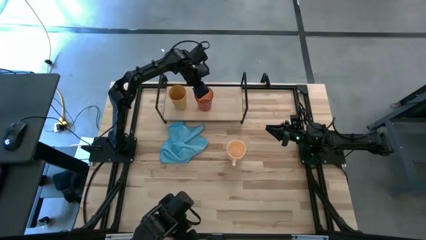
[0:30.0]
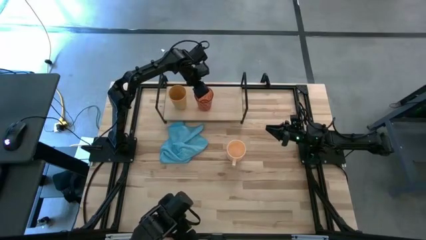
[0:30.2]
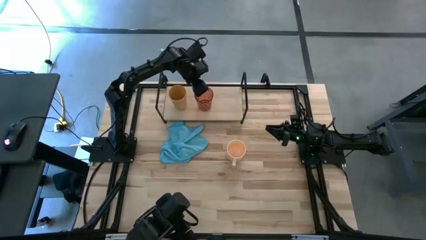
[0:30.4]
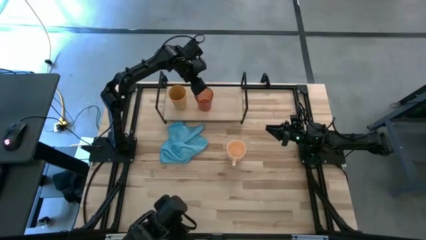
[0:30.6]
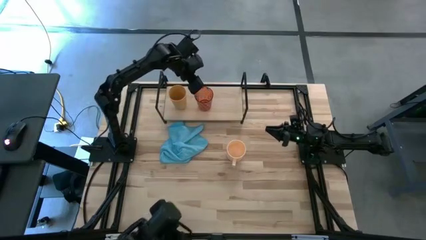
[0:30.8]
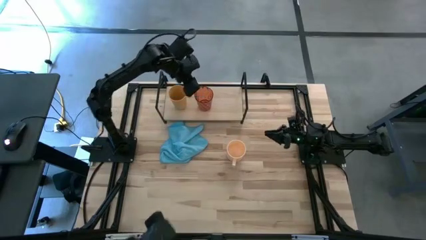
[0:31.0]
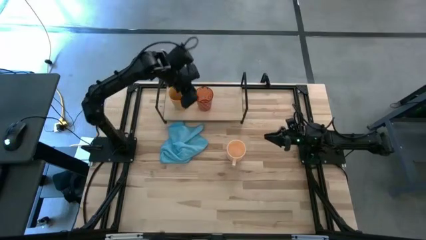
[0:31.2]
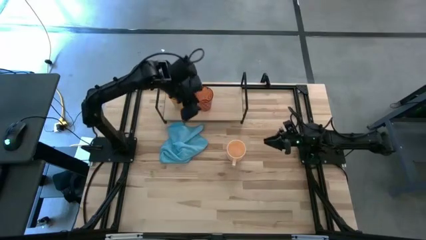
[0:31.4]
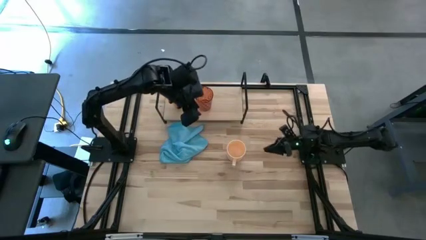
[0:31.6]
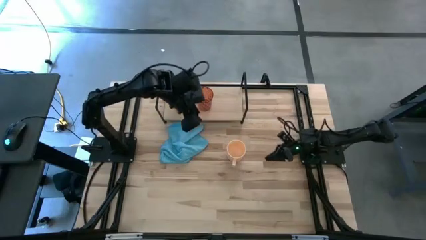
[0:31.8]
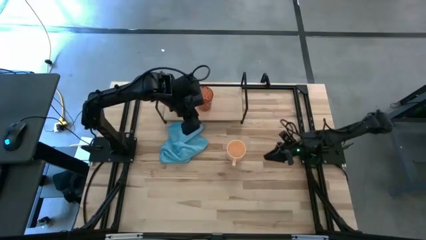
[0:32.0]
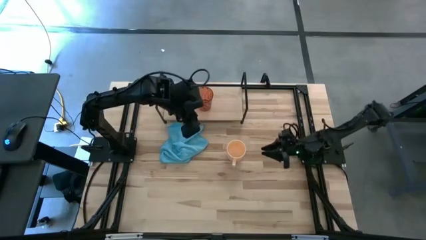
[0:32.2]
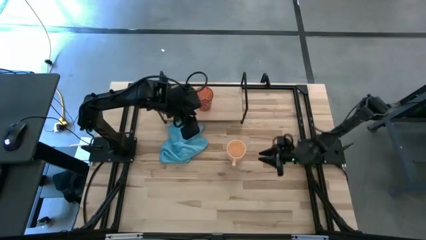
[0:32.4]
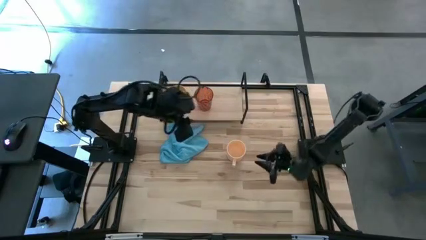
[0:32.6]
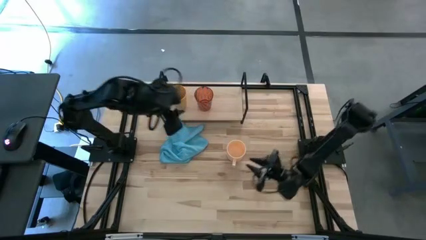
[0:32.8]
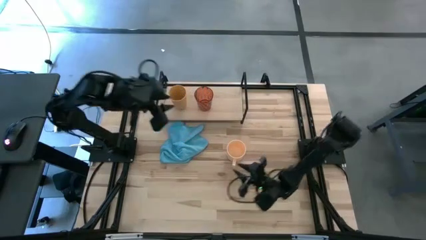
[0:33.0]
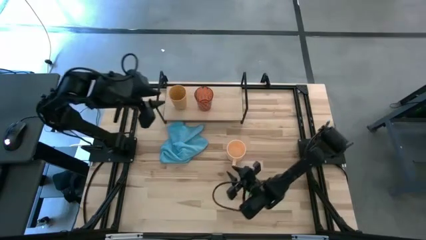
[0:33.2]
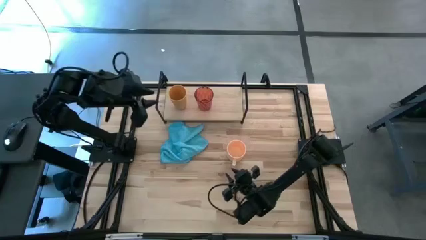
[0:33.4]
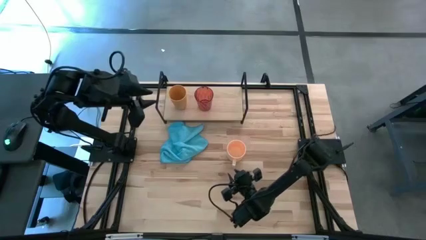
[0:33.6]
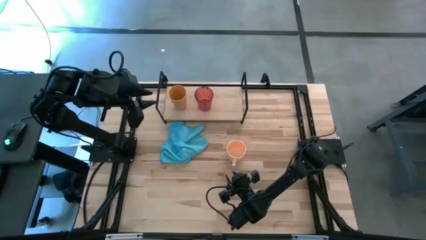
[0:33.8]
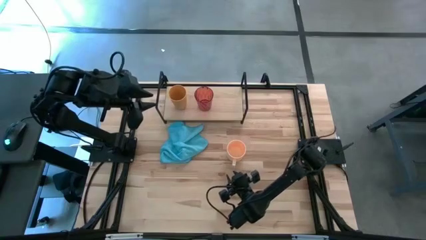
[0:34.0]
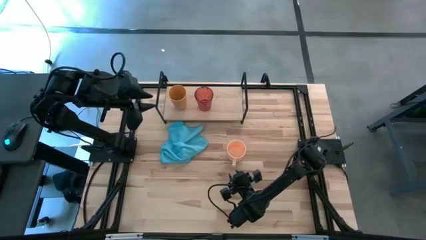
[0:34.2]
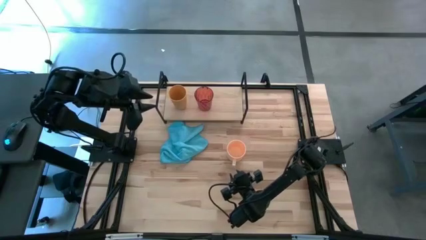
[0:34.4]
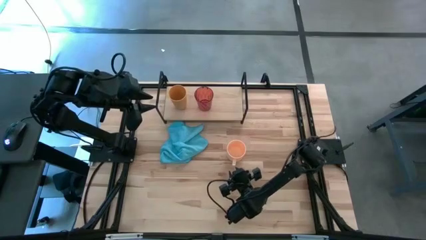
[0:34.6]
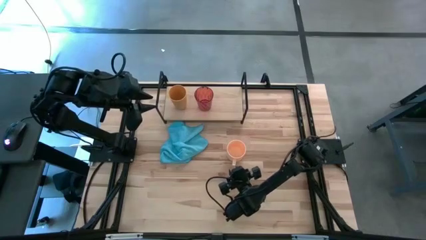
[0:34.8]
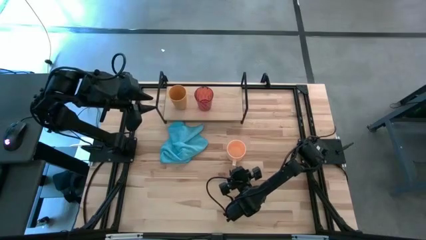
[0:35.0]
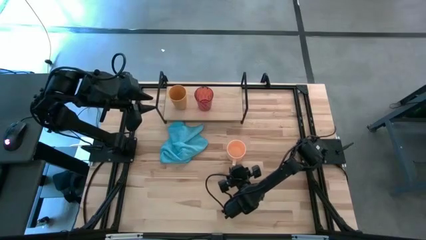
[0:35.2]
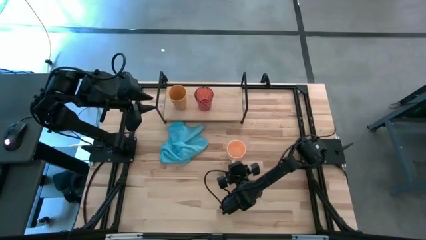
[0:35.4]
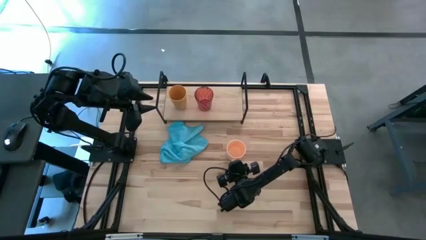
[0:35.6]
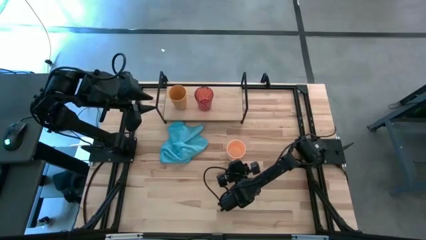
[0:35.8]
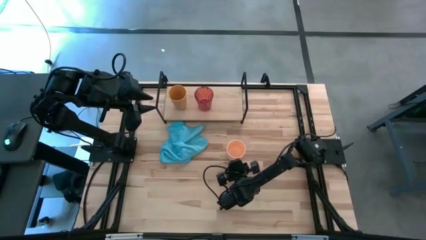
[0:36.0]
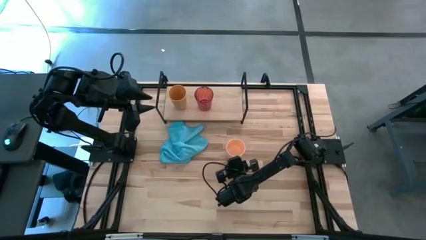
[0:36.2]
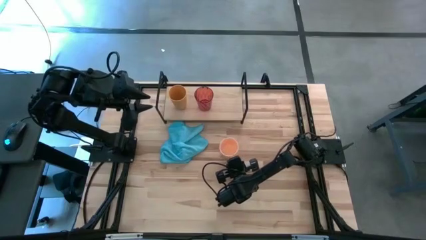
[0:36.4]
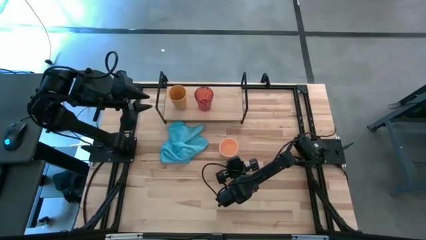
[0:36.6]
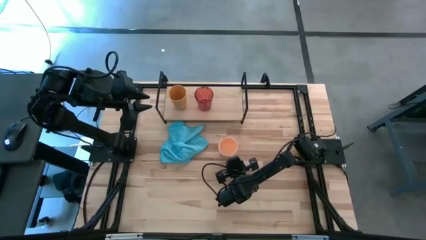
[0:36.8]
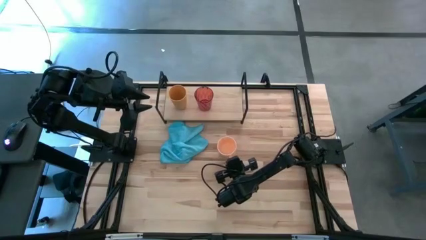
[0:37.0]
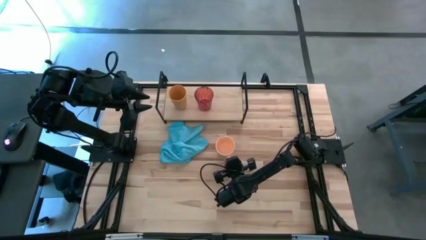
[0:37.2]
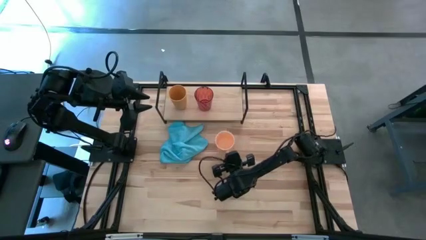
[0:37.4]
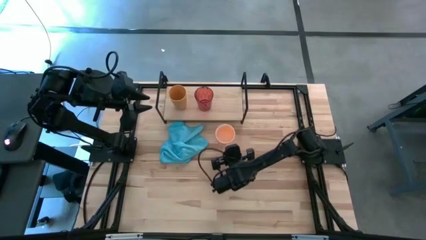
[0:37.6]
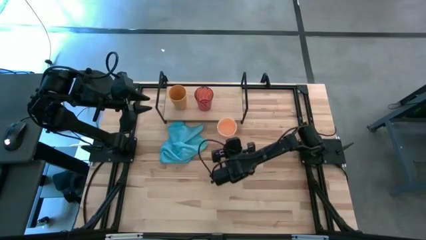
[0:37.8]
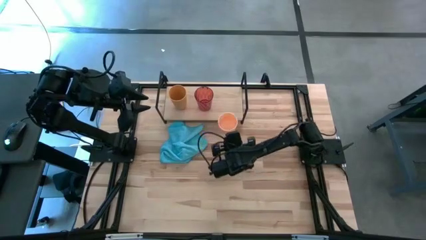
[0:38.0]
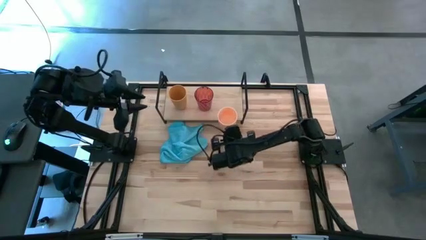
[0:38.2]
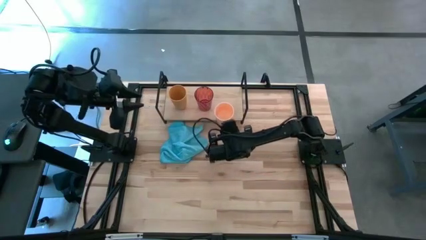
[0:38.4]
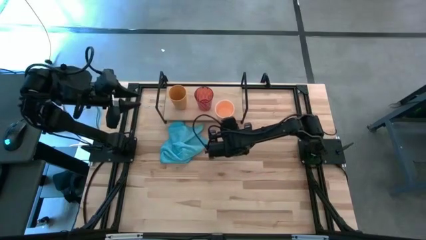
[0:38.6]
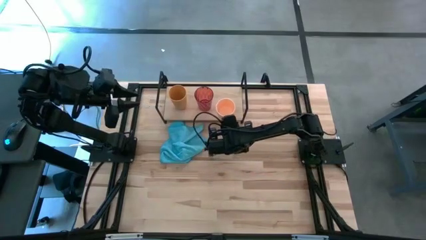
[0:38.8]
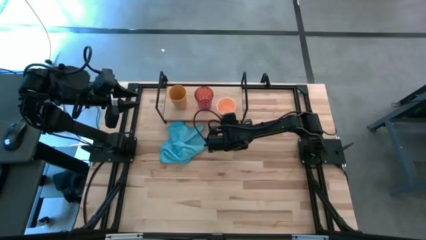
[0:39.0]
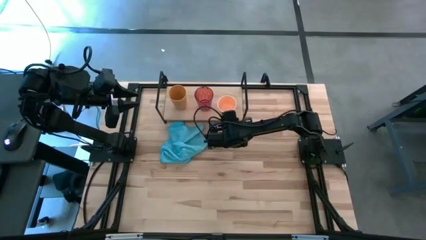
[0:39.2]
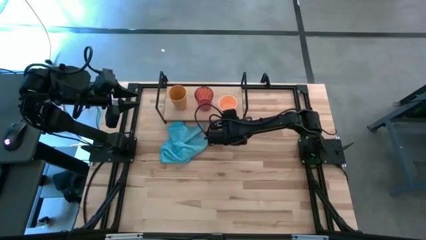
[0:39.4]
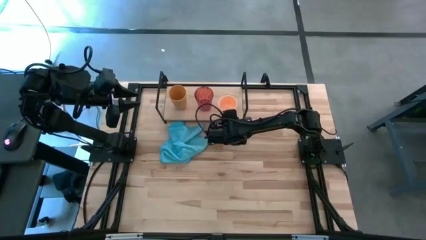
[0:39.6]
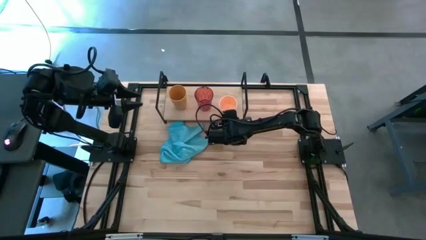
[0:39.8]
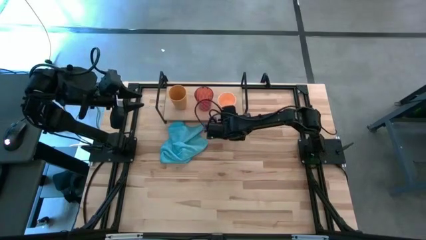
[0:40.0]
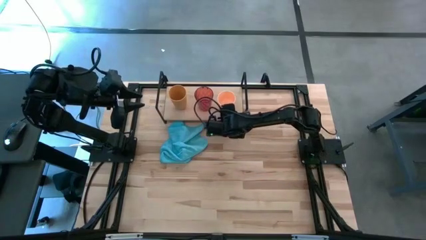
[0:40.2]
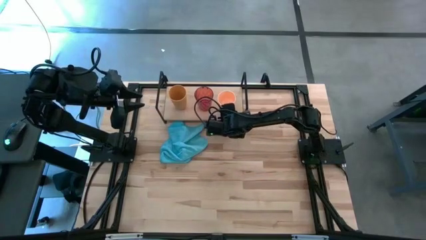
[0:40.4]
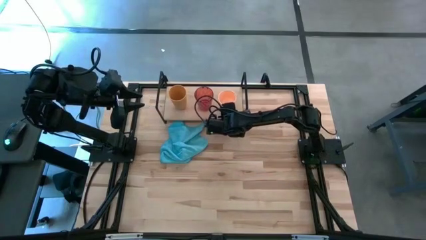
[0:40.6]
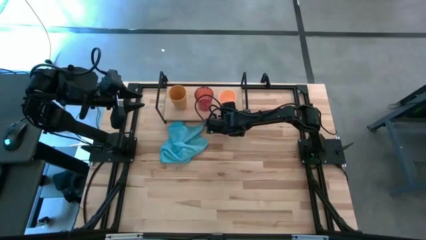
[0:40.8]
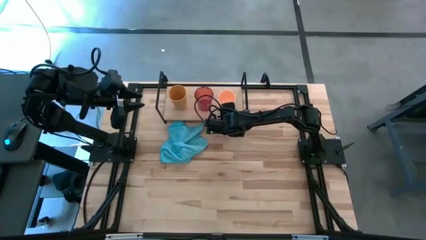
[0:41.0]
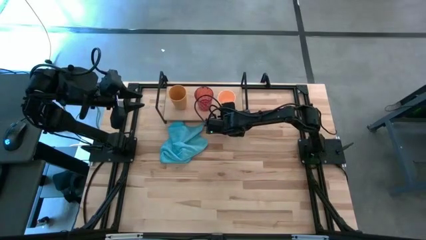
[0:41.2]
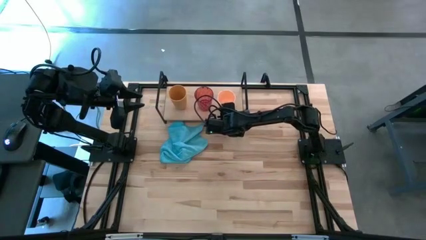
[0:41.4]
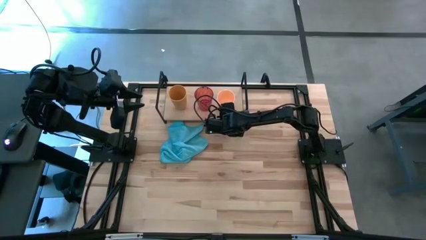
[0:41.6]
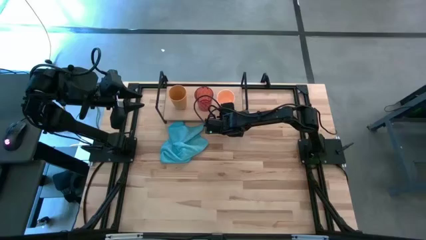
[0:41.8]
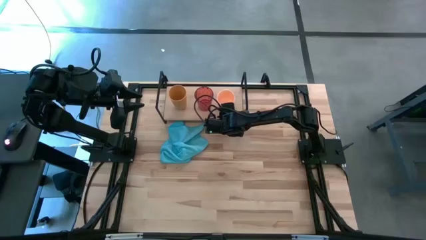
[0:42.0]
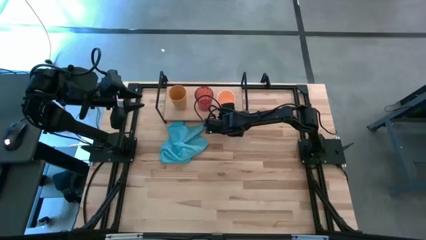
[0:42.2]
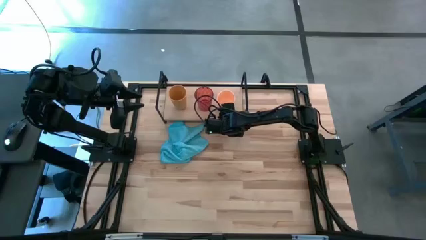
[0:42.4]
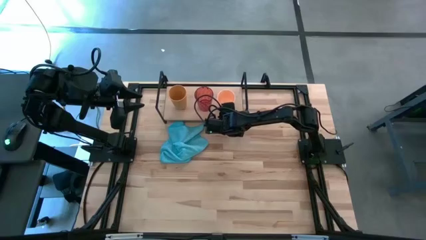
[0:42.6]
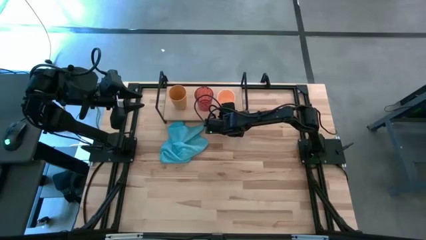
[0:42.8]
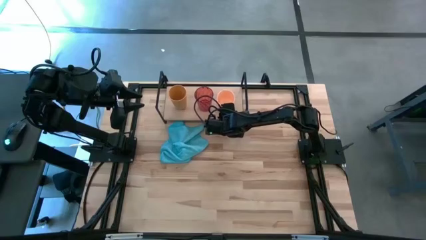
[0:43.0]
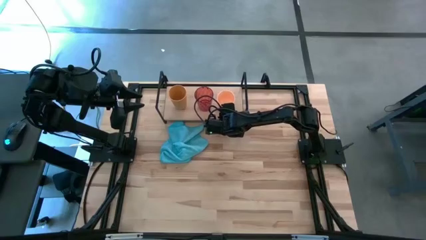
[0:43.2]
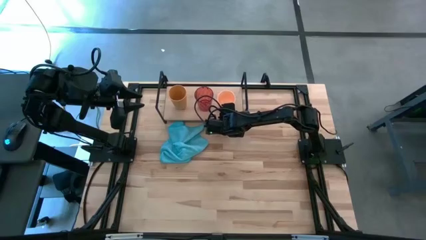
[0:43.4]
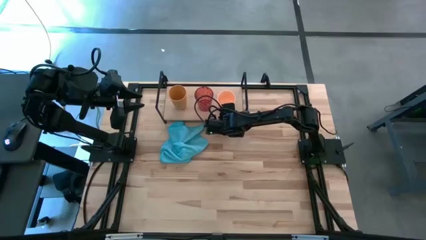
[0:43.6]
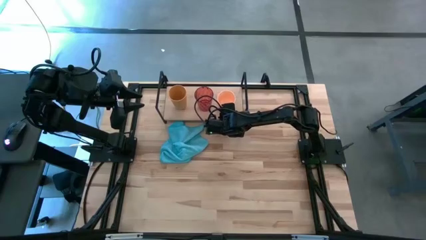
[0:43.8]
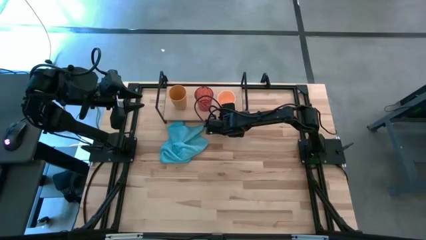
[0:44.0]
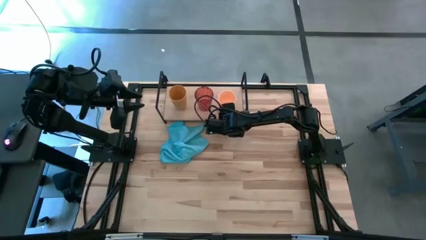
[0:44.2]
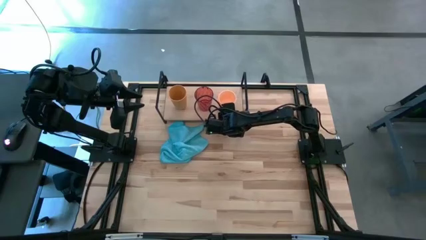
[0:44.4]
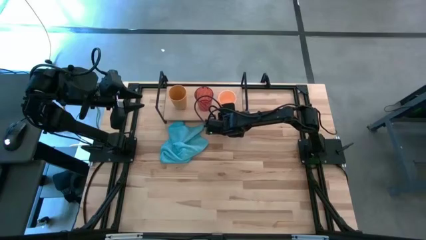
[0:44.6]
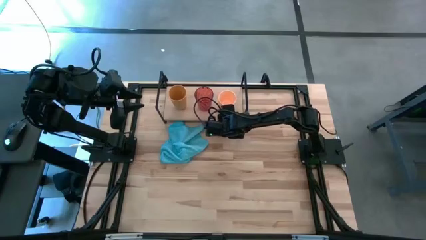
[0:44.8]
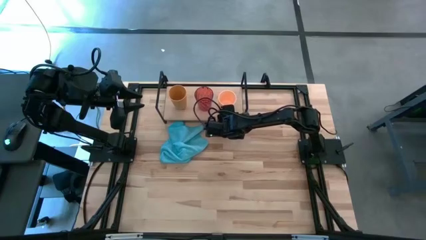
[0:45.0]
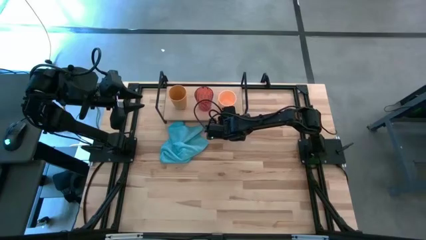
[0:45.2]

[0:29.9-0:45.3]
Task: Stack small to large cups/mugs on shelf
Put the yellow mug on the shelf
